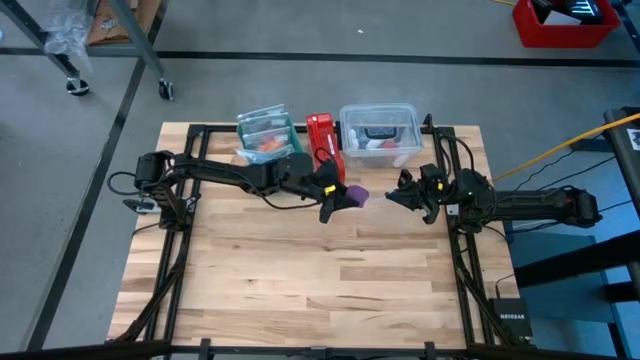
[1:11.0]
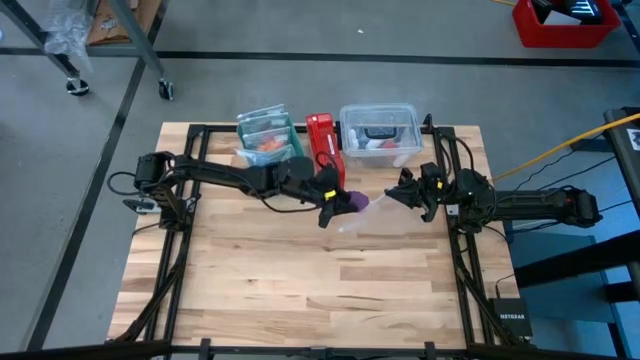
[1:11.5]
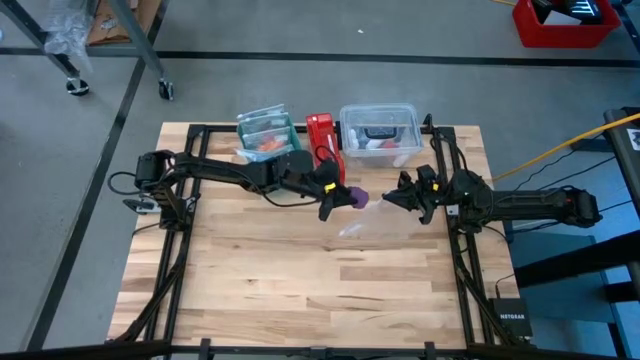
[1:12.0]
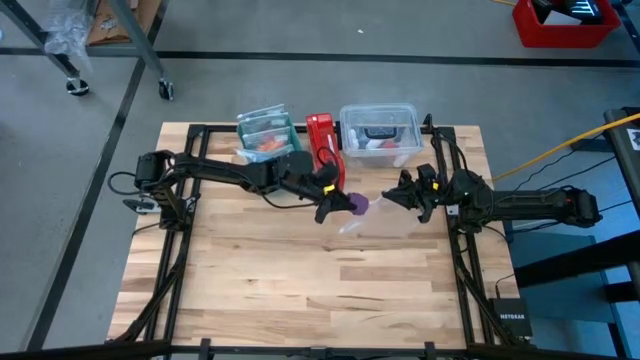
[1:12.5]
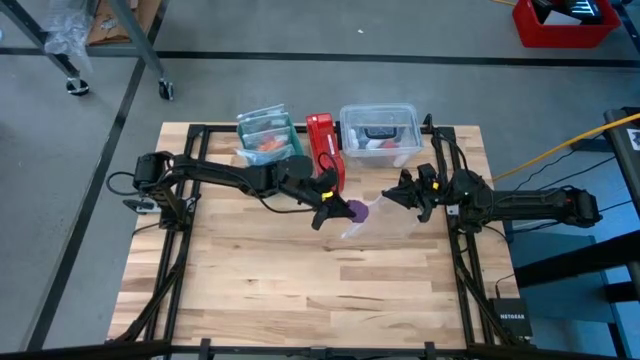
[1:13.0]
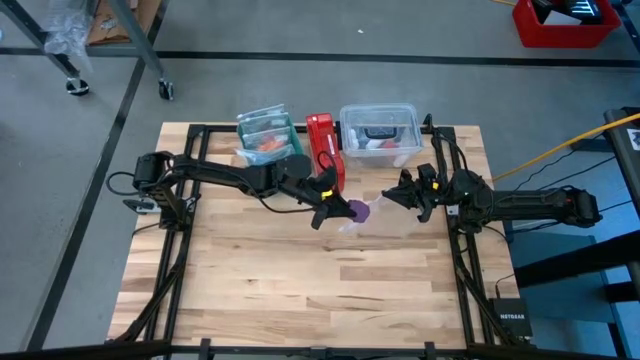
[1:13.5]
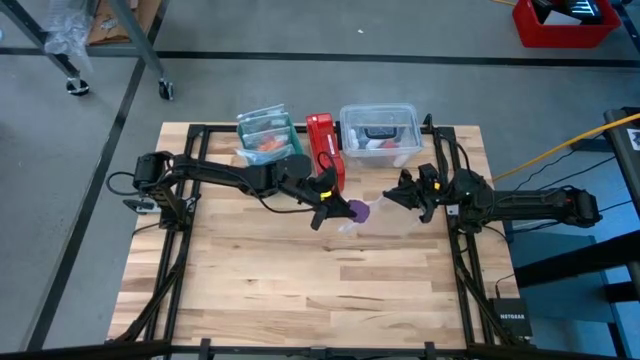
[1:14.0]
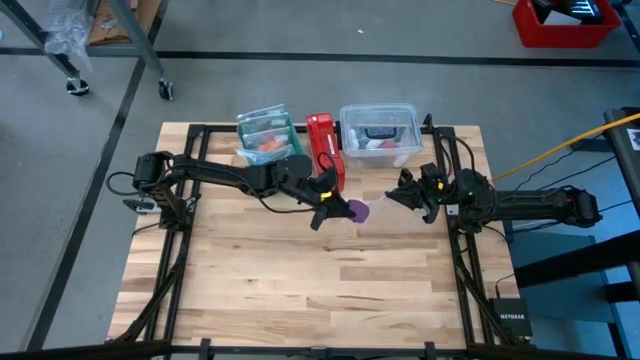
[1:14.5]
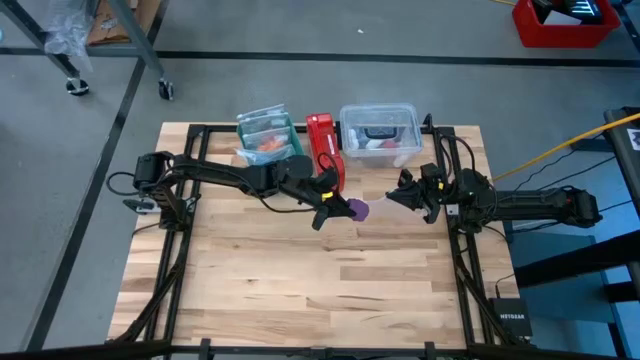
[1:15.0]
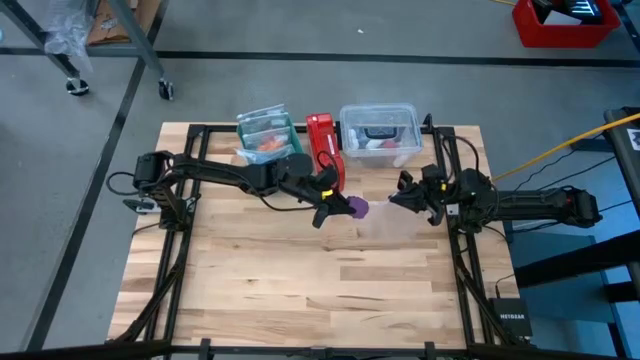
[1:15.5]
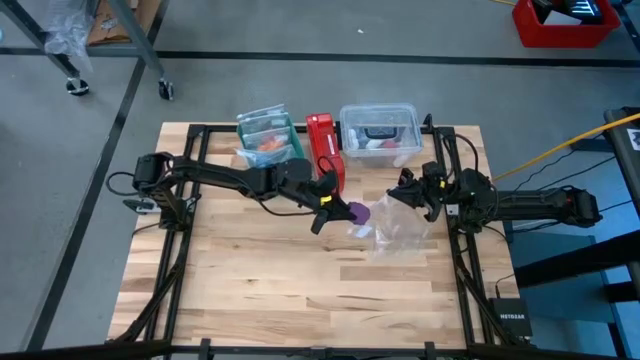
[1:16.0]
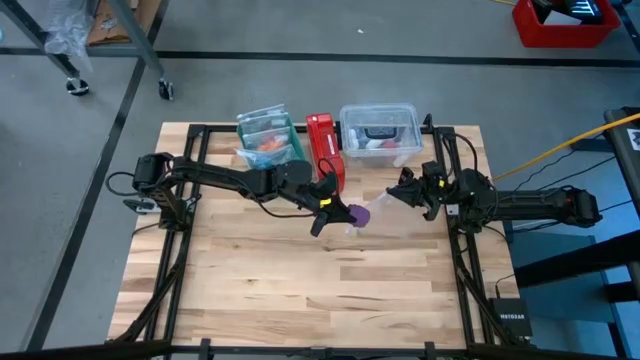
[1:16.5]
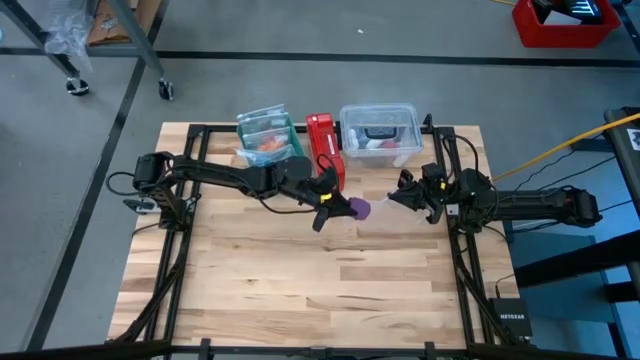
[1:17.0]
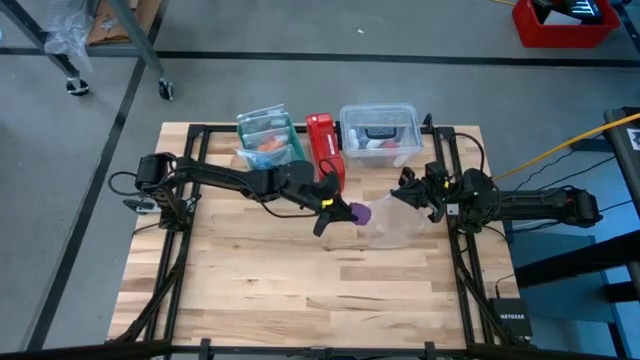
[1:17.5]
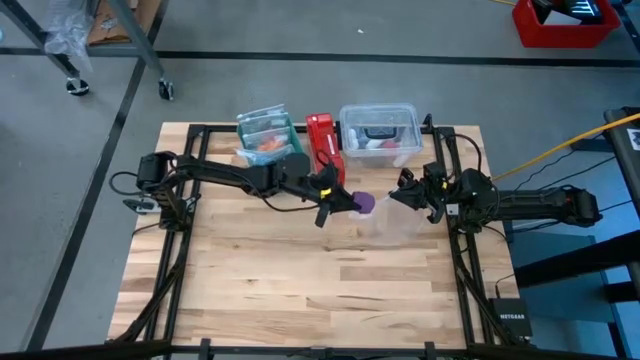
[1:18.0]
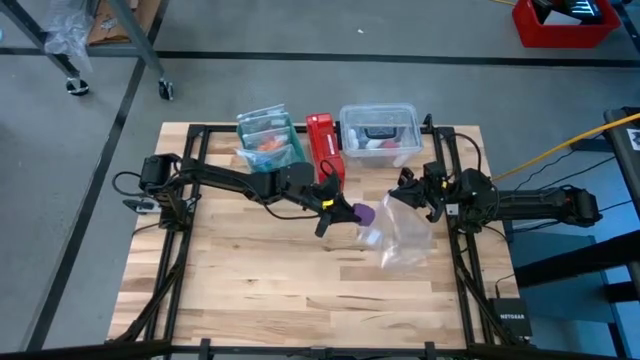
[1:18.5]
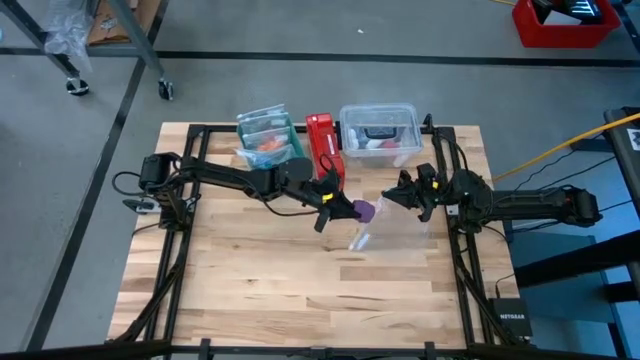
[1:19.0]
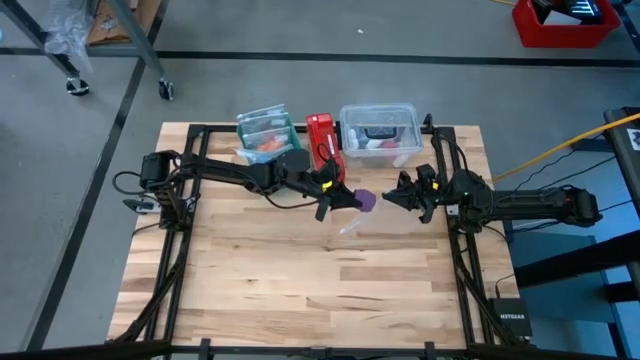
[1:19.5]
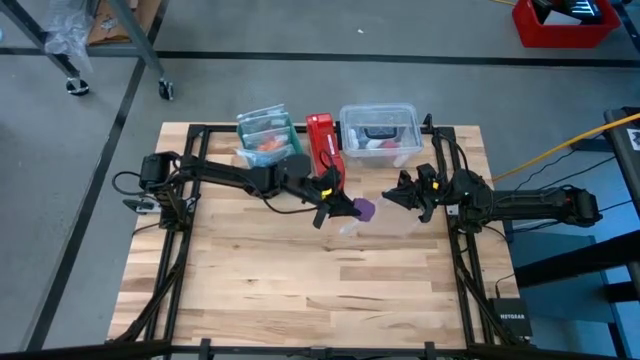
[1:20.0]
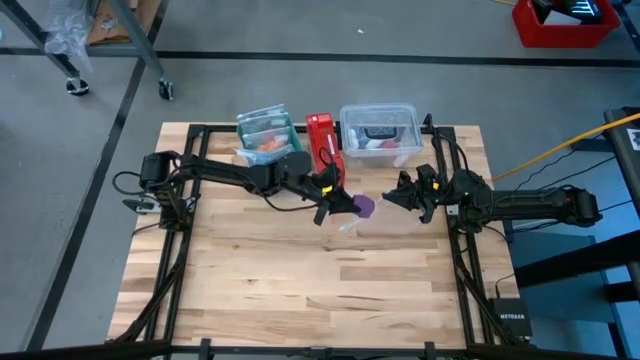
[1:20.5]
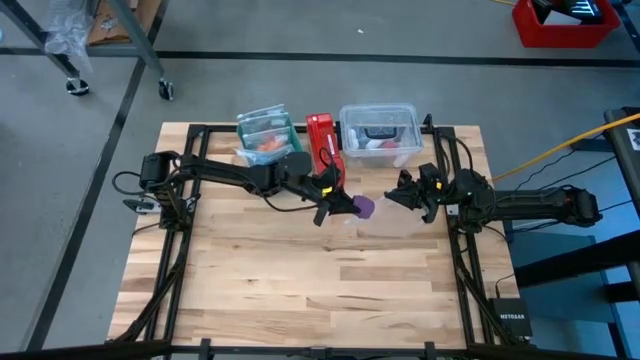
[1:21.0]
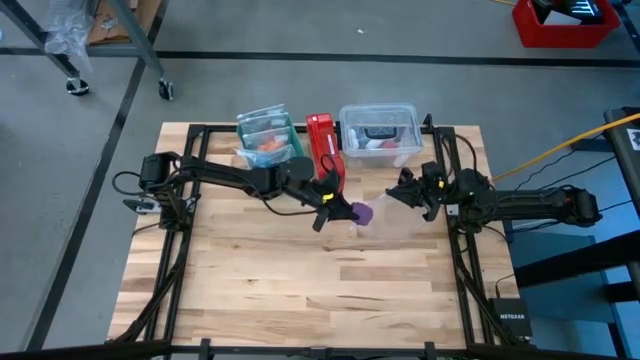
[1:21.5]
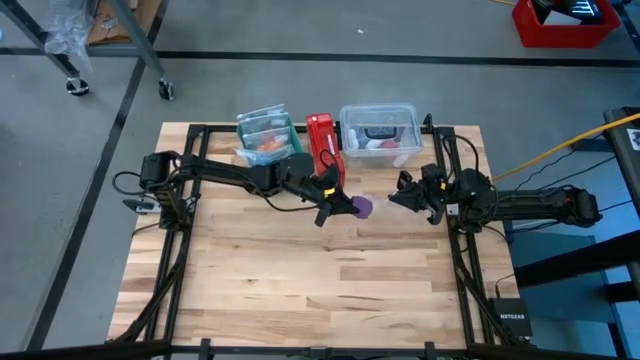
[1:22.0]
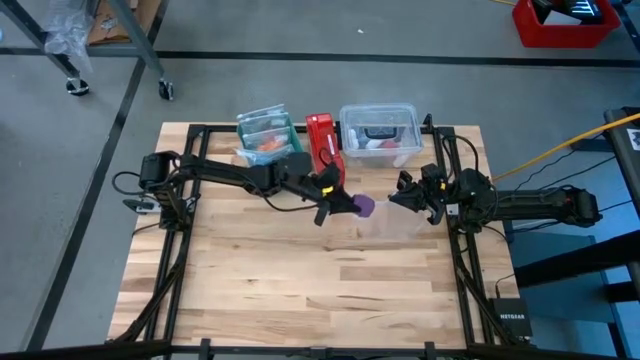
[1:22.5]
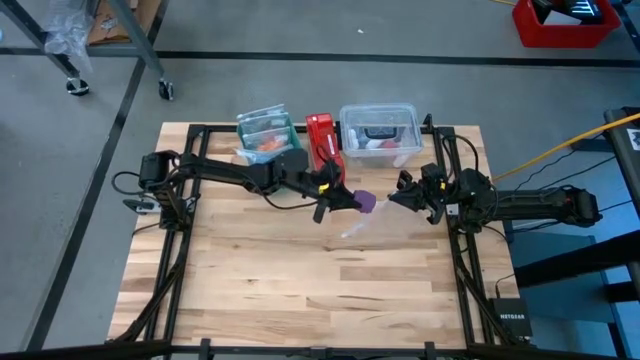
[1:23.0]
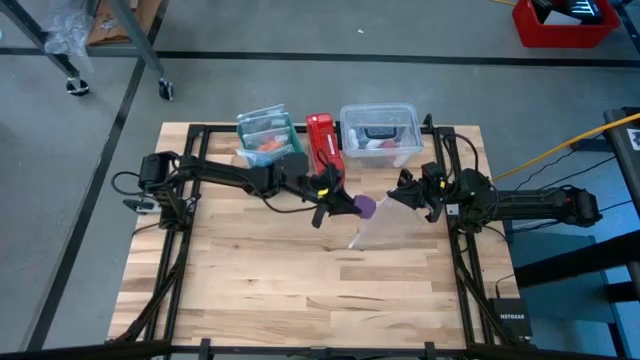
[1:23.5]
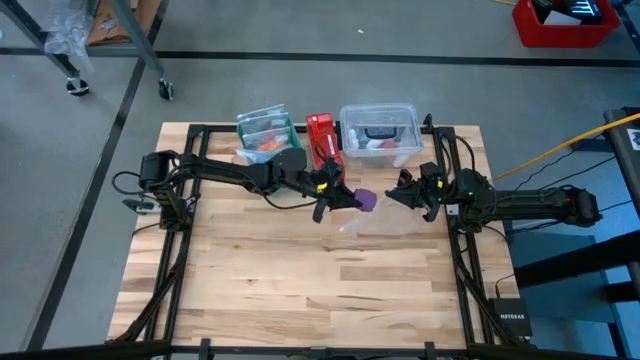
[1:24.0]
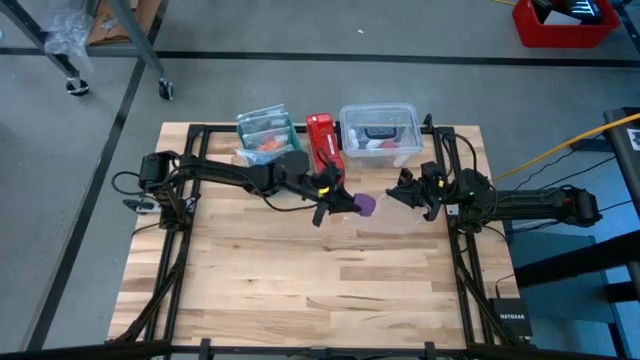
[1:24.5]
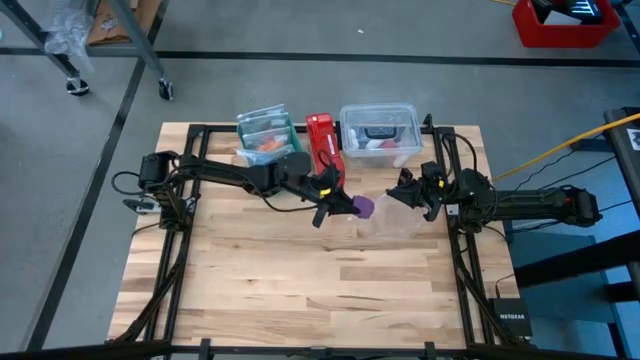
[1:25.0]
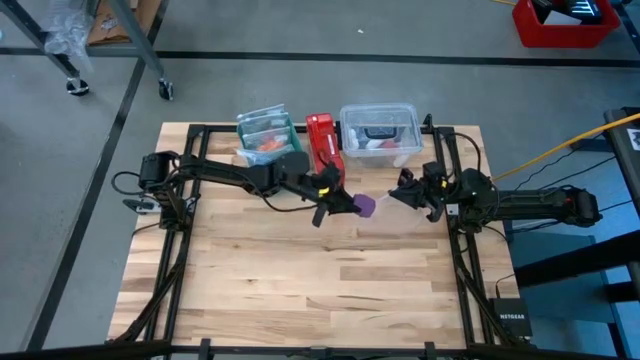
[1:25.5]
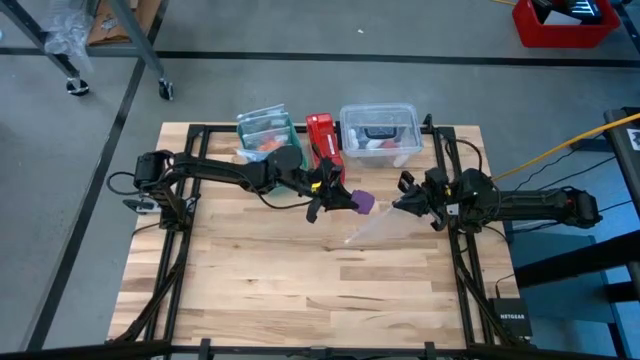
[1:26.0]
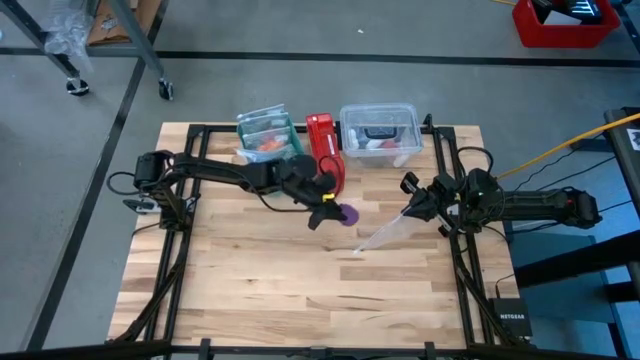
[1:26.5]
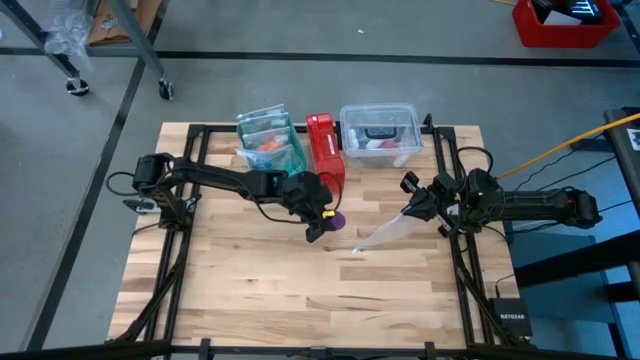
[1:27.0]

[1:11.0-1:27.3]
Task: Roll bandage
Put the purple bandage into the transparent zip bag

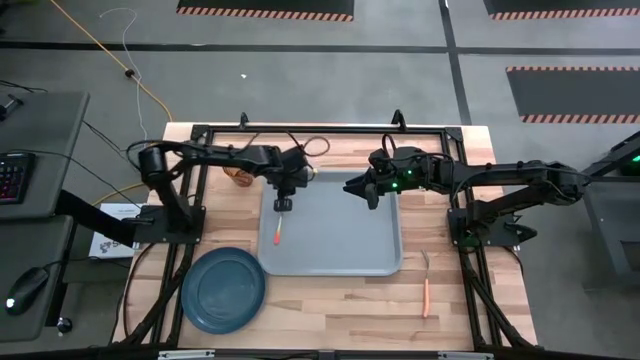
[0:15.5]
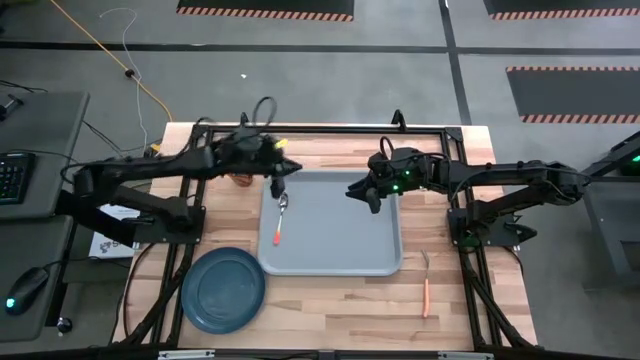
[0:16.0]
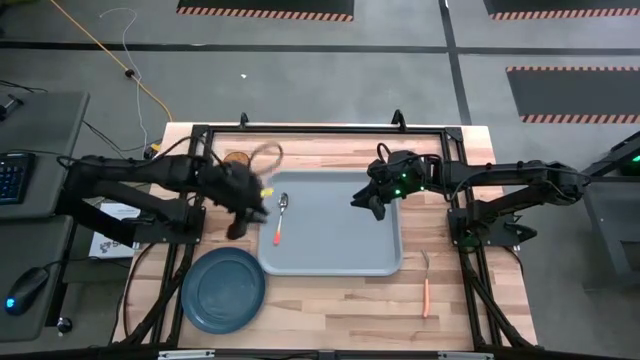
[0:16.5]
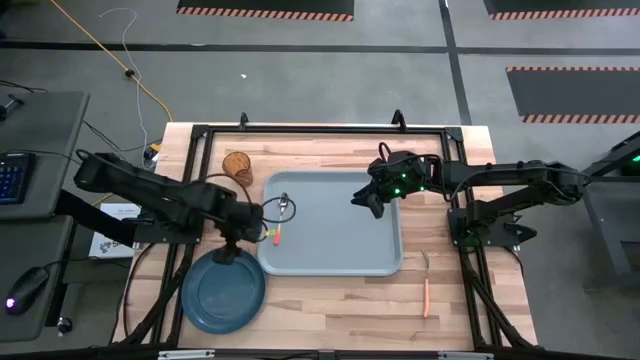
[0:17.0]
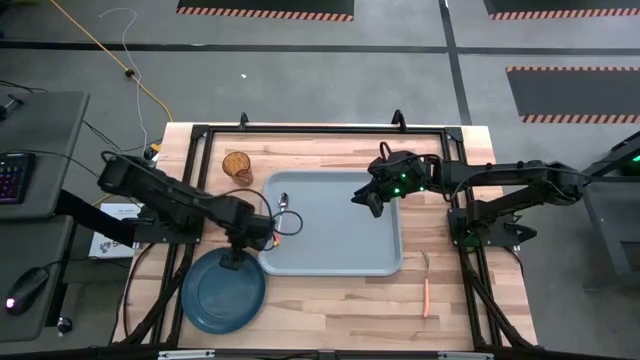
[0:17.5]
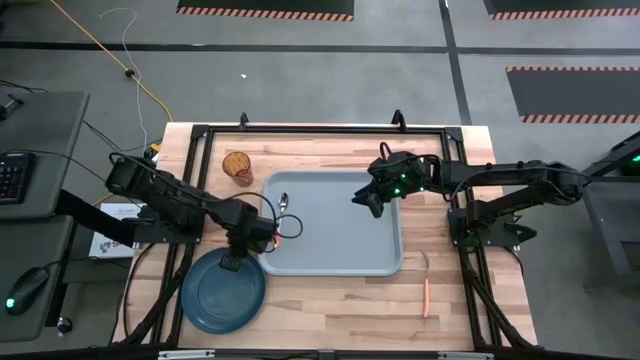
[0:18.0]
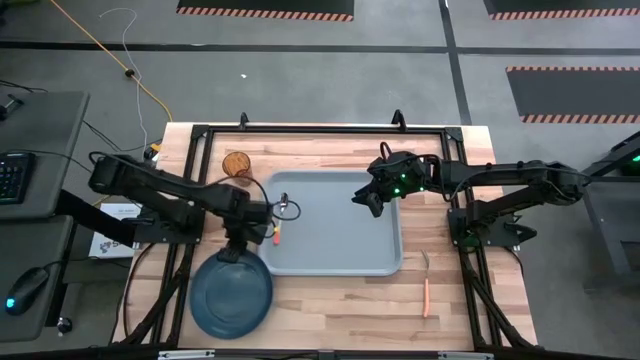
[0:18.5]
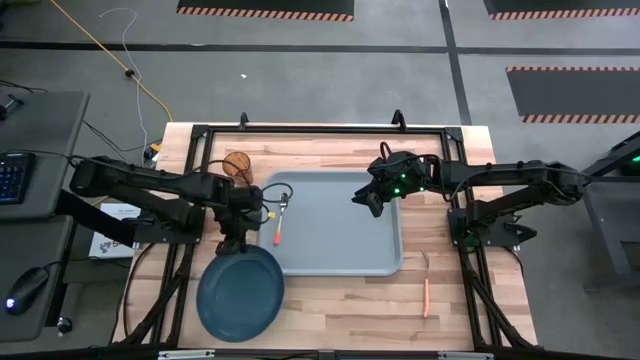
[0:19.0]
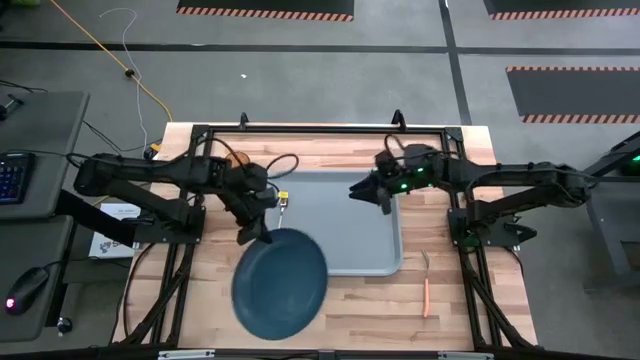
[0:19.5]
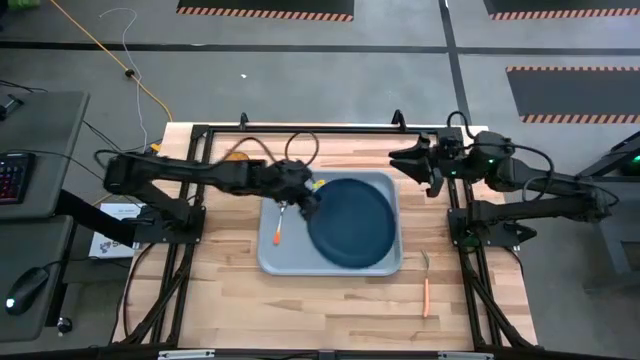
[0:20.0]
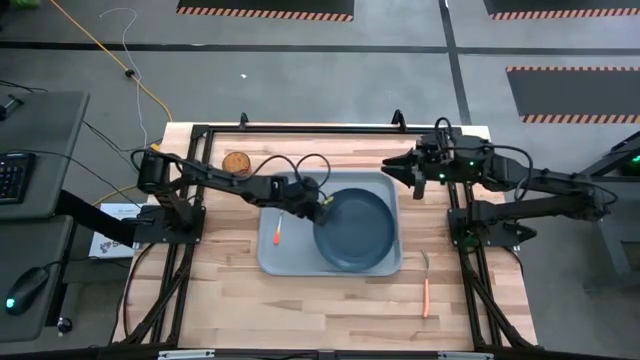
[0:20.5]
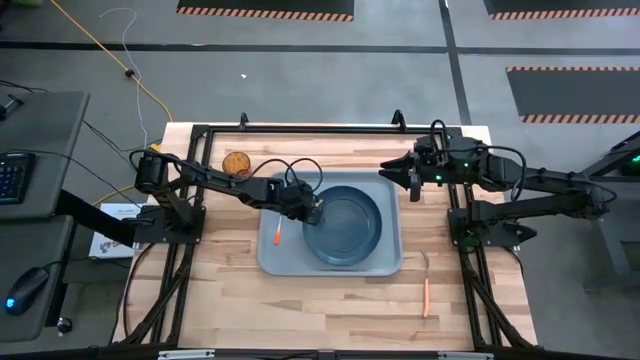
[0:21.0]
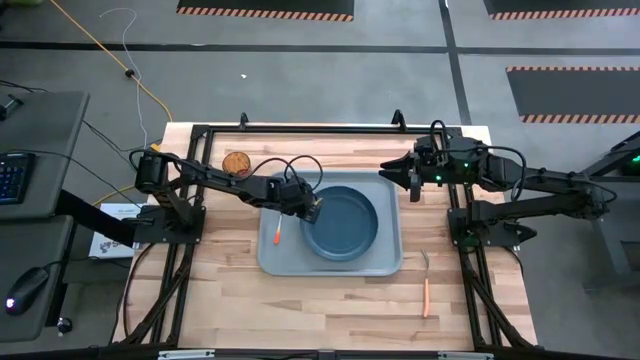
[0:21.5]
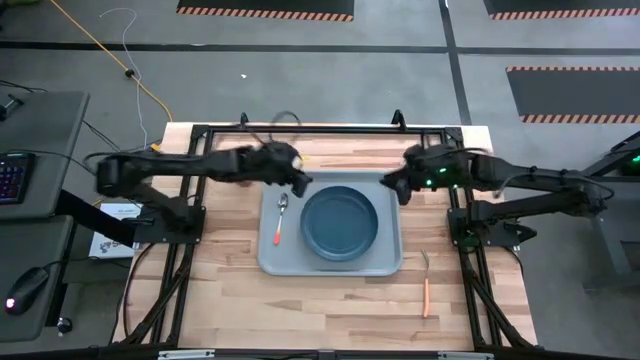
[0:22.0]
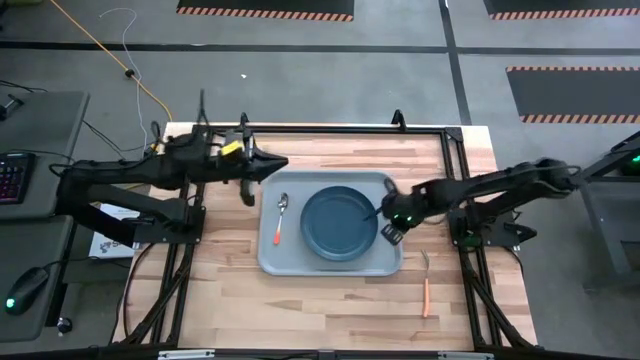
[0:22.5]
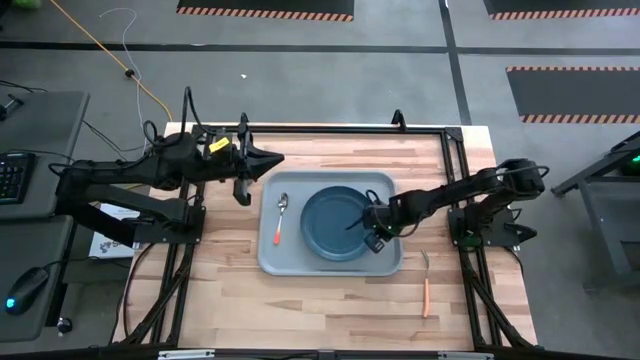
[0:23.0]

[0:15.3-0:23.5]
Task: Pick and place plate/cup/fork/spoon on tray
Put the blue plate on the gray tray
